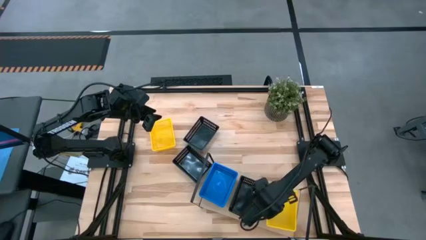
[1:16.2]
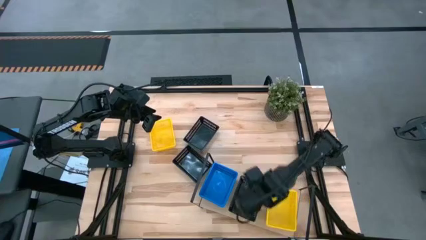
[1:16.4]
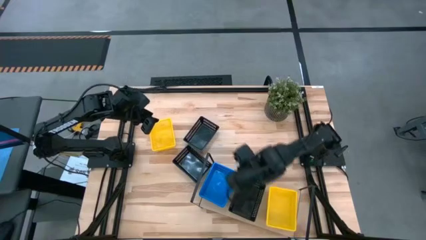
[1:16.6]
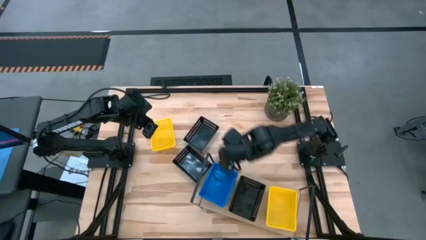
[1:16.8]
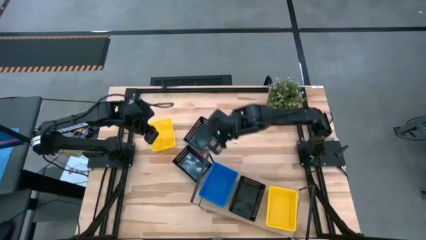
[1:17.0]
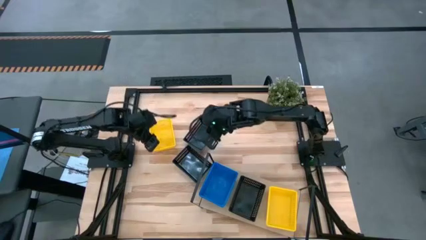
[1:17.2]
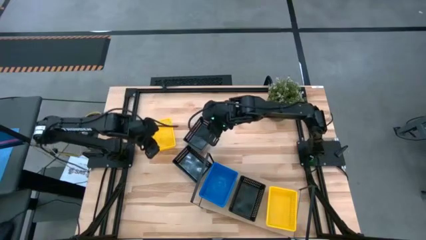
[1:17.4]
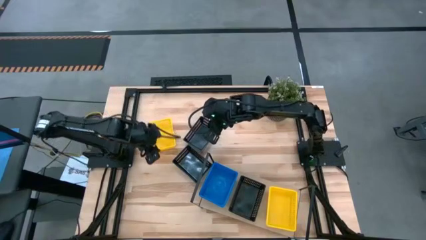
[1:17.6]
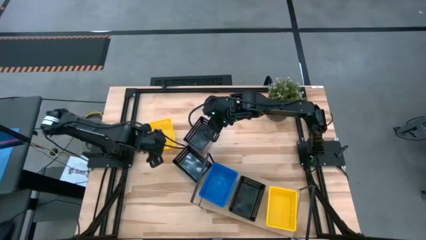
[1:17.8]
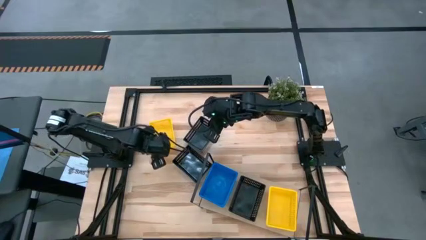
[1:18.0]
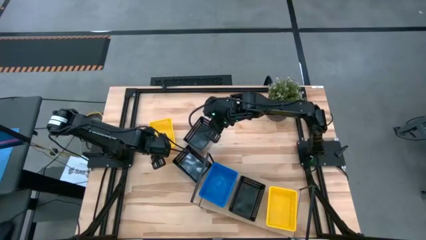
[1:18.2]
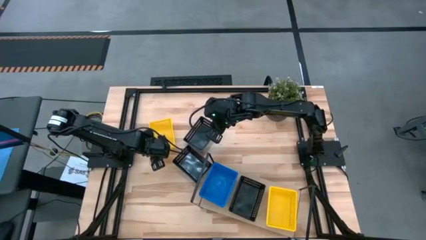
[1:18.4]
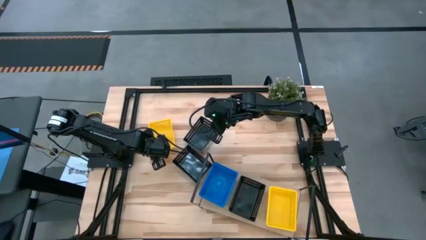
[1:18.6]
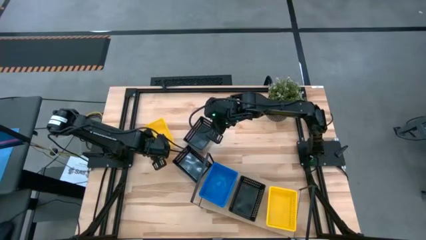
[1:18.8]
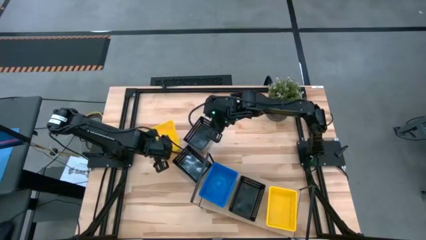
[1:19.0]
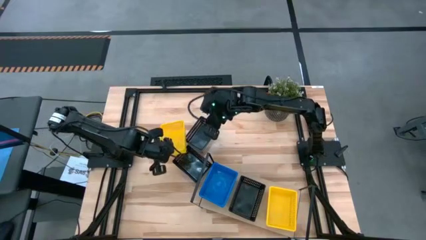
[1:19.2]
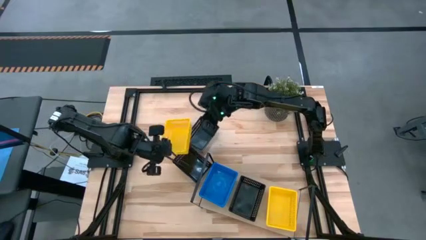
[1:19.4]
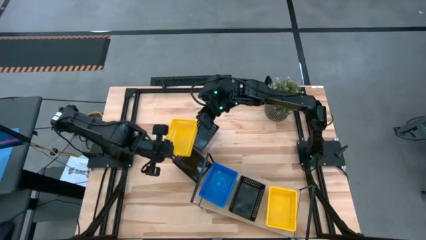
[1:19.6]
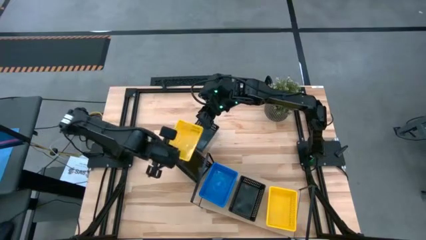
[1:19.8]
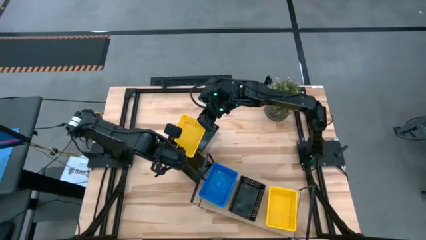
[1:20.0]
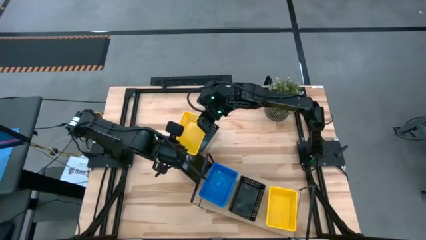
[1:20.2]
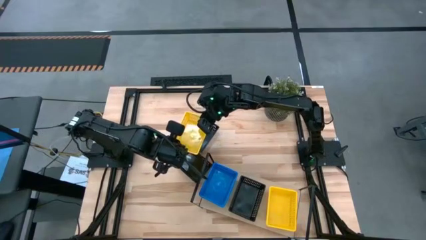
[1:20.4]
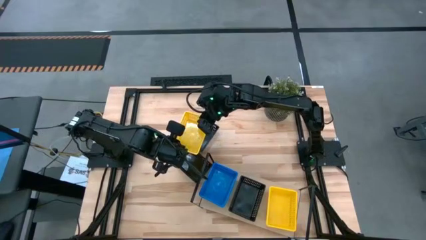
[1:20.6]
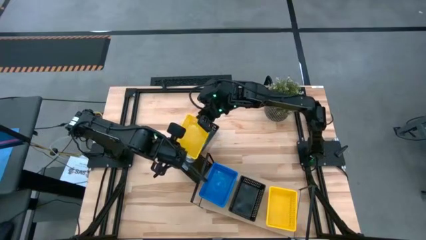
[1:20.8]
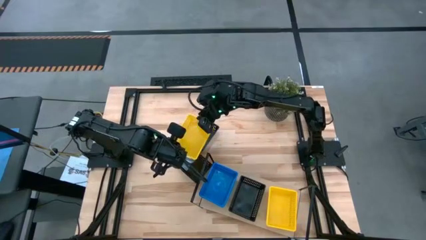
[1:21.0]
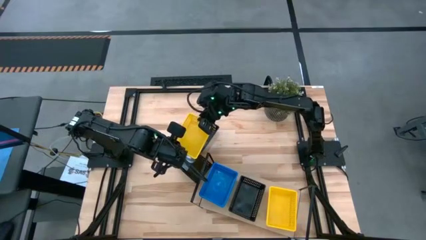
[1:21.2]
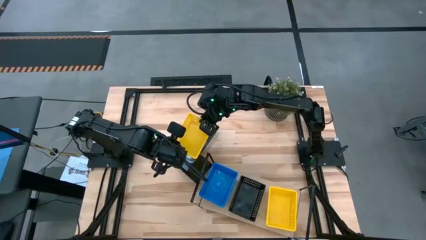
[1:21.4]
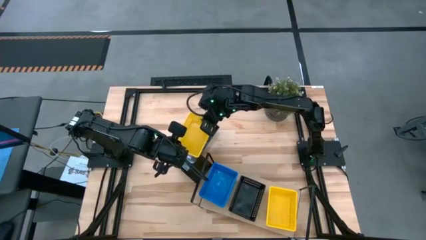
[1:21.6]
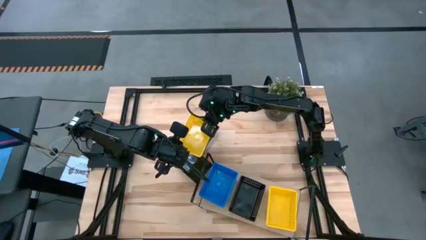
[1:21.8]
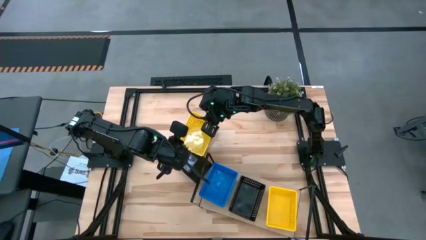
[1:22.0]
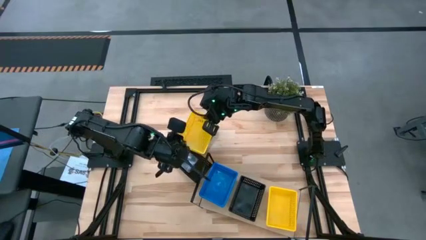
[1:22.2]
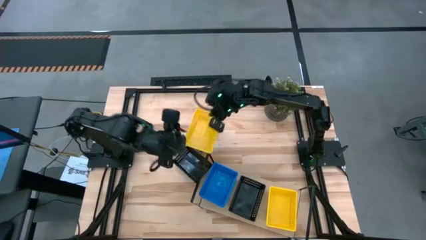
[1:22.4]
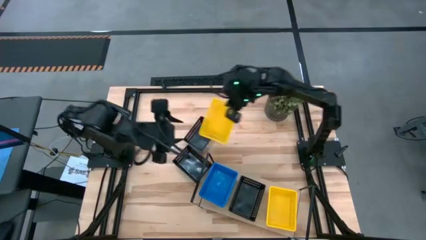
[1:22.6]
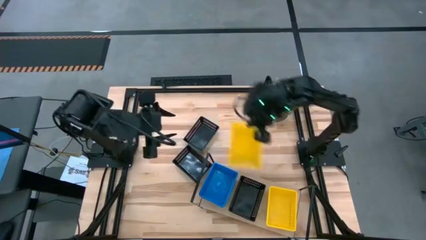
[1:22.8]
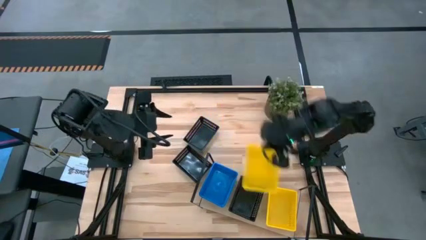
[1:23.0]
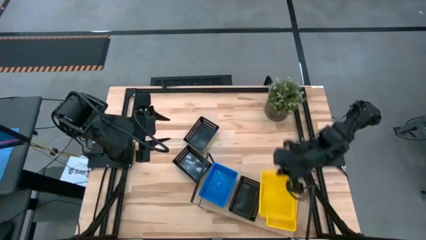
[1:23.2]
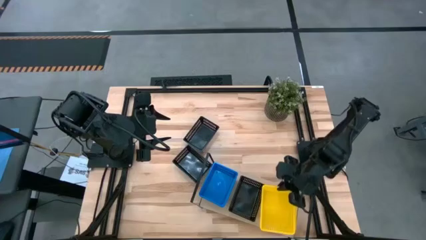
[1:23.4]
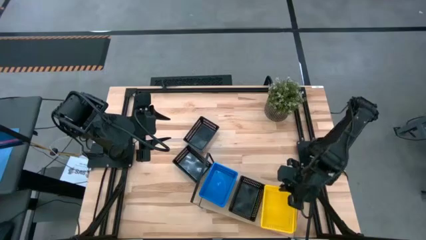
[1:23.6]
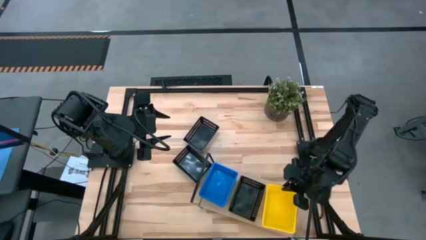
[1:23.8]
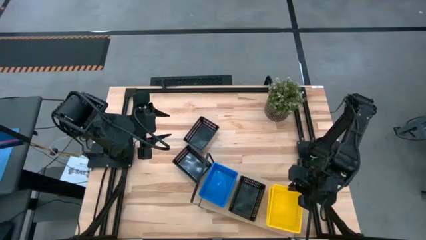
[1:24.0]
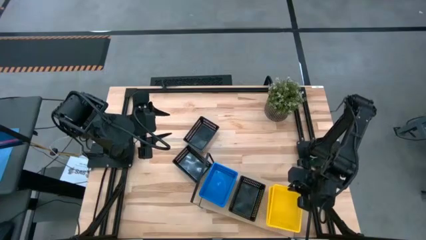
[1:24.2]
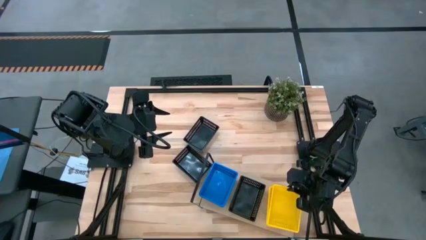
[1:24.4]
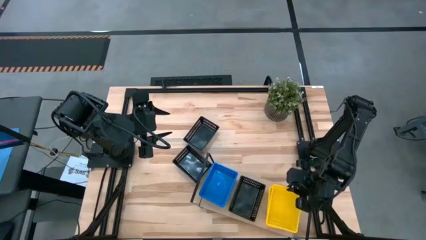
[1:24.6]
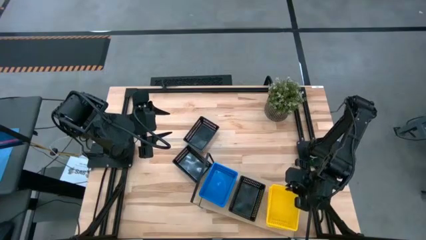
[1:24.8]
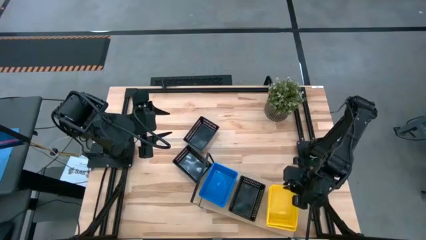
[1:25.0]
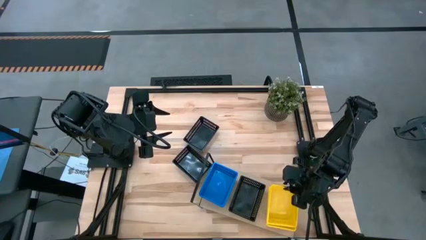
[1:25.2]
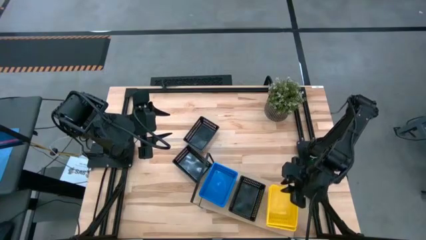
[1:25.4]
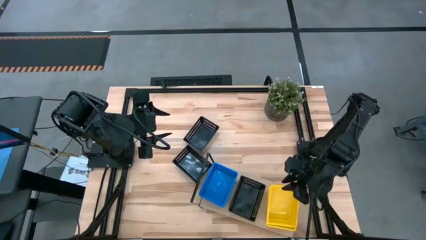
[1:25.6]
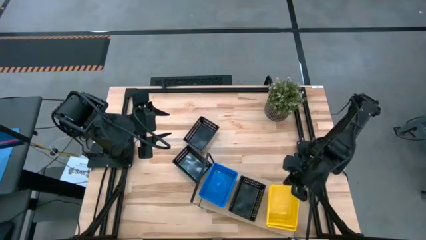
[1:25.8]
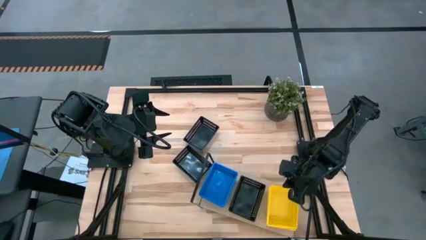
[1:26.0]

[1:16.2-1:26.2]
Task: Stack baskets on shelf by color
Stack the yellow bin on top of the yellow bin on the shelf

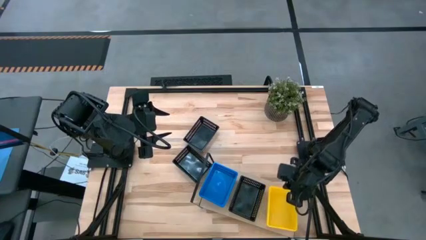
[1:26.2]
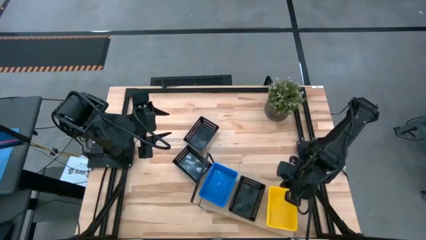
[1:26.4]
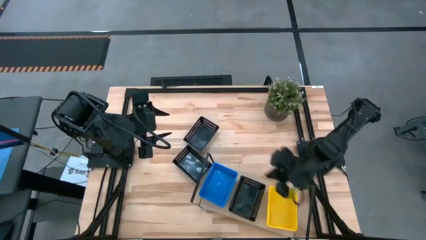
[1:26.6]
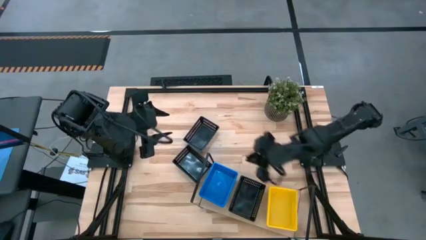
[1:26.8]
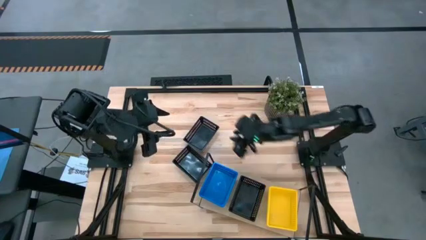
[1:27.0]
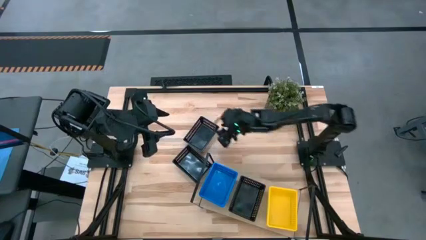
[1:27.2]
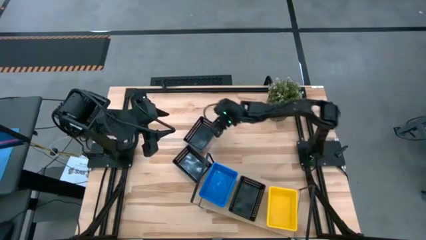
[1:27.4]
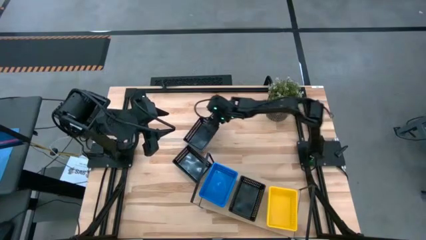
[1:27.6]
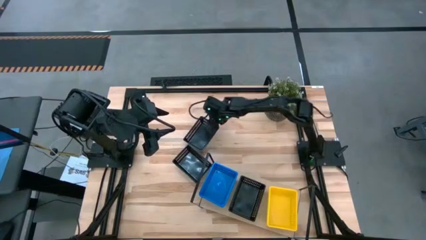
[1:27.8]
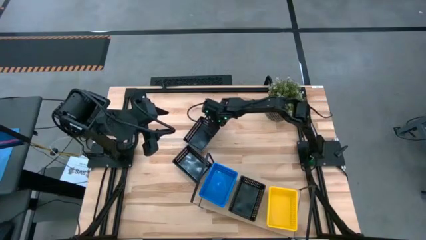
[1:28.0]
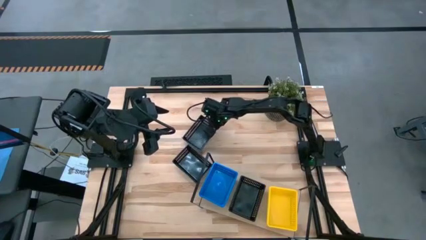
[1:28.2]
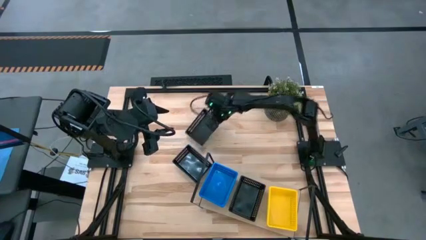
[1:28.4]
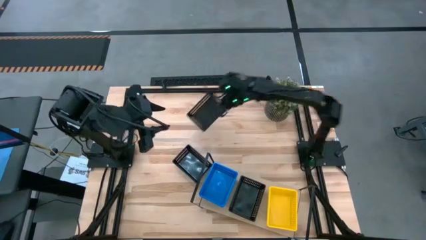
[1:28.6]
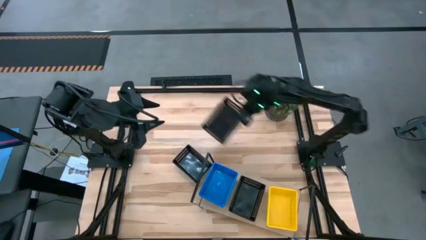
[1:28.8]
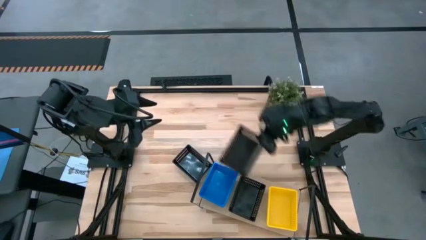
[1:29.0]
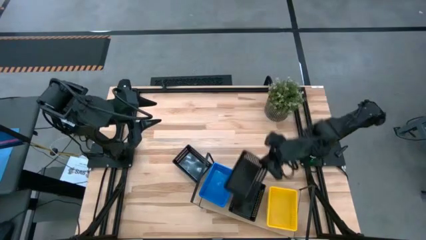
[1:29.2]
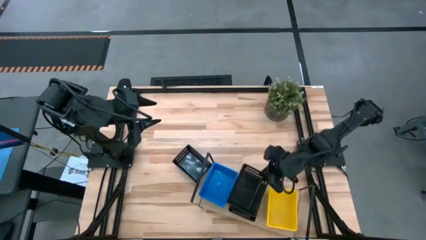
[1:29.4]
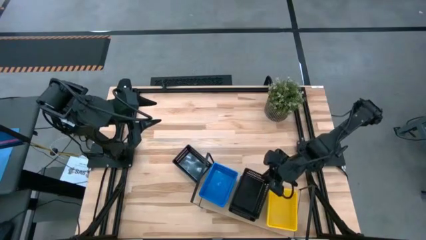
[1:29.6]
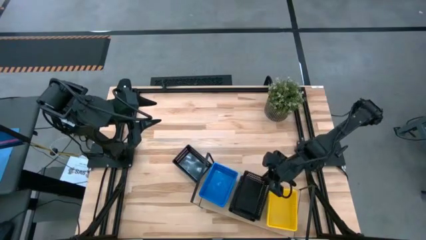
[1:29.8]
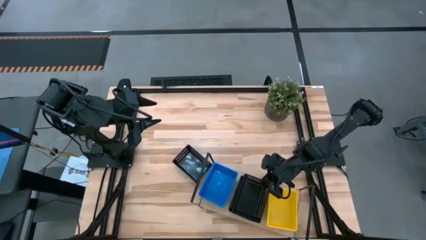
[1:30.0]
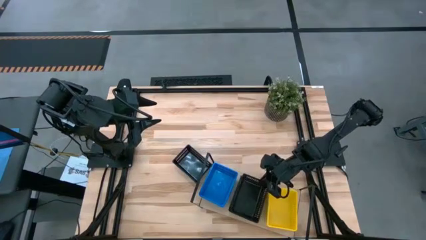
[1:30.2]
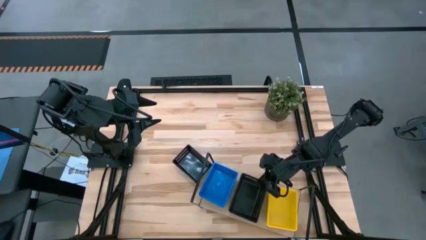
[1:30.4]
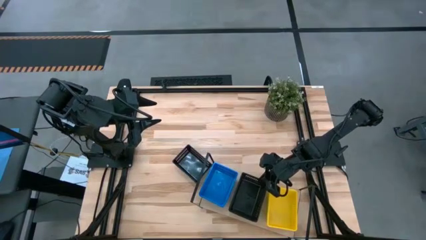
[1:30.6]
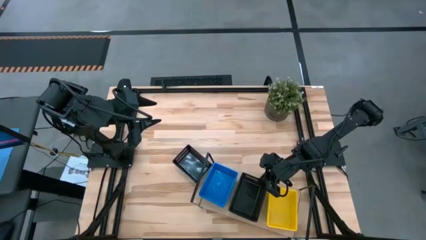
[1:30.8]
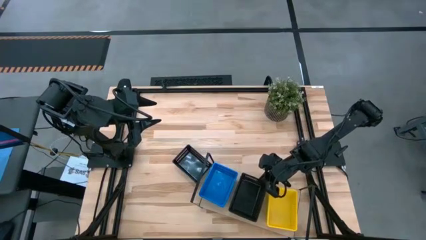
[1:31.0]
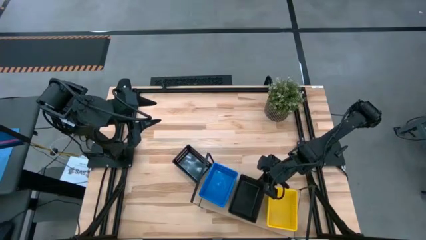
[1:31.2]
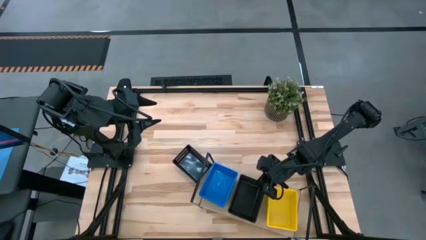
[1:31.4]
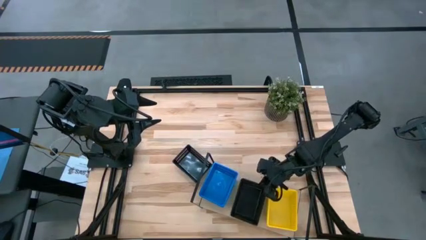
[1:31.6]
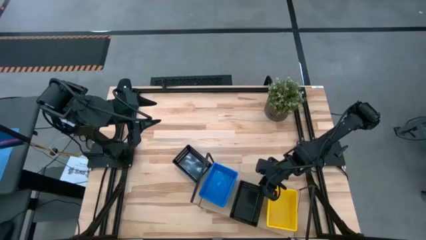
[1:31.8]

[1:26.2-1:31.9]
Stack the top black bin on top of the black bin on the shelf

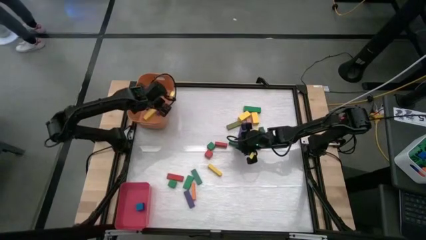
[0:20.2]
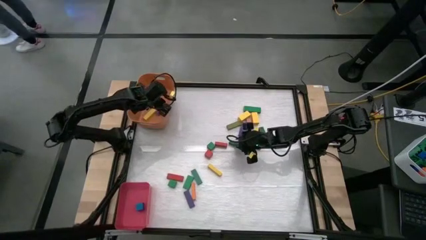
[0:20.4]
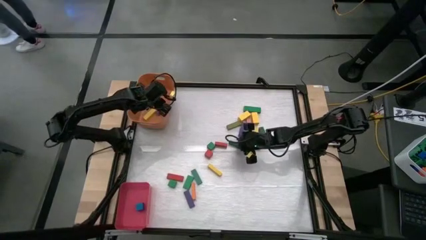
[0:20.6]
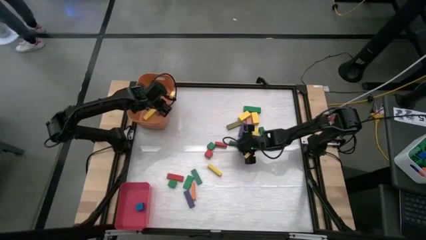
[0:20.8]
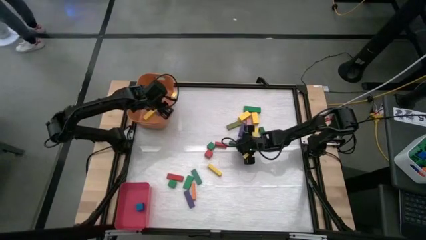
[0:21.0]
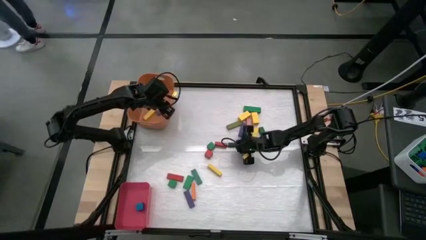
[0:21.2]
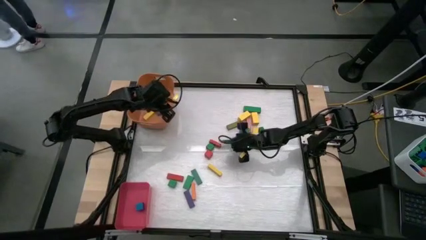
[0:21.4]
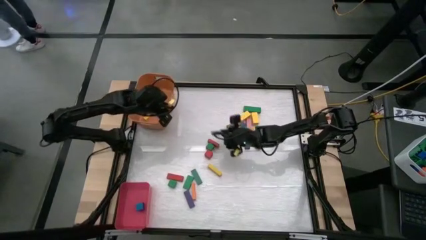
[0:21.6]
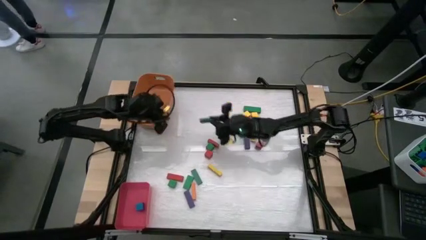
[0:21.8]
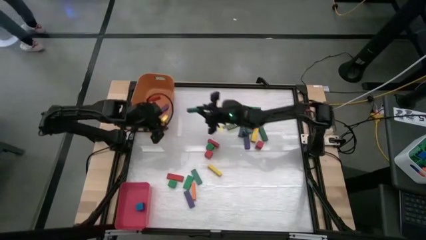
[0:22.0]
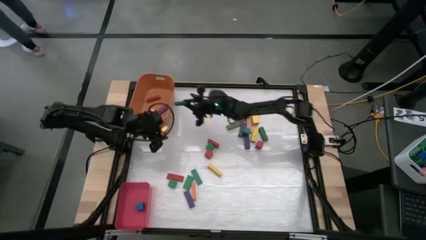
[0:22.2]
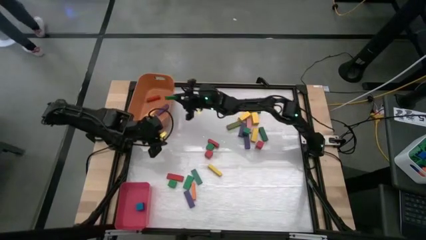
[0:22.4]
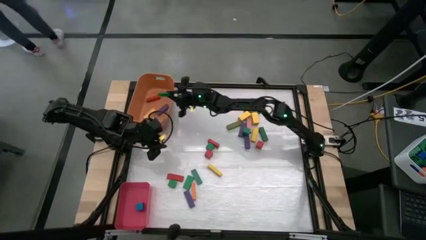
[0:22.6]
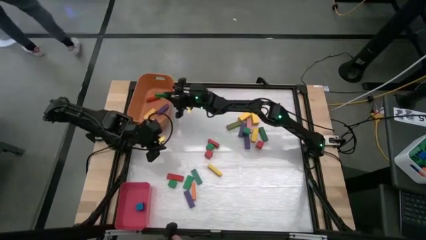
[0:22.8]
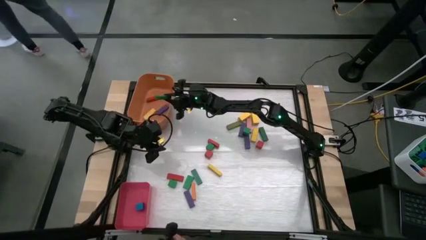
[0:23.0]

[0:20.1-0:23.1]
Task: Sort blocks by size
Put the big green block into the orange bin
